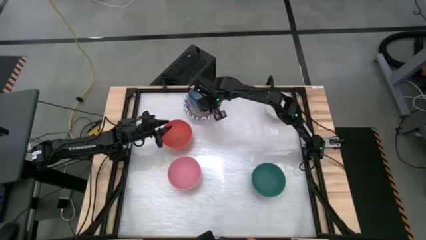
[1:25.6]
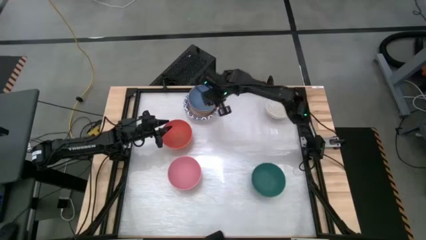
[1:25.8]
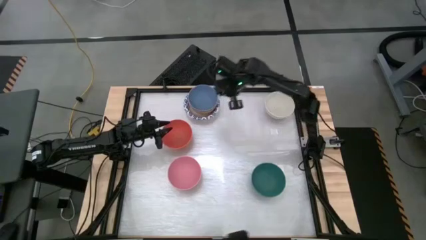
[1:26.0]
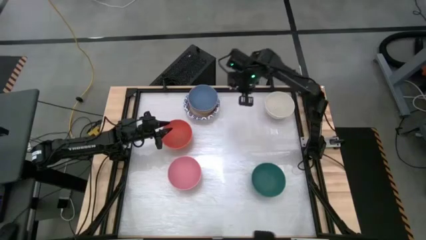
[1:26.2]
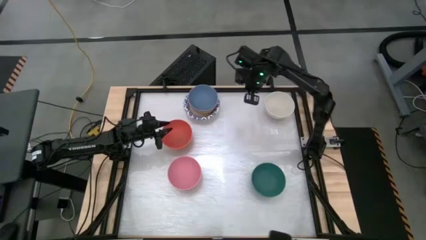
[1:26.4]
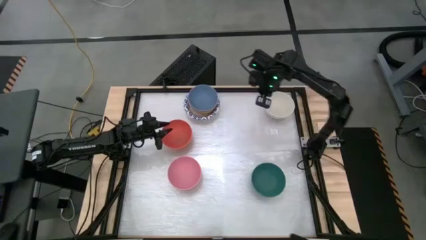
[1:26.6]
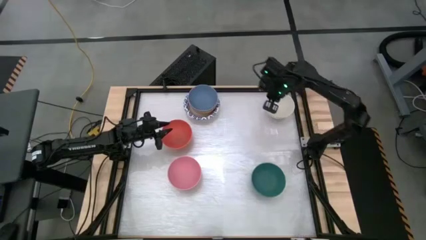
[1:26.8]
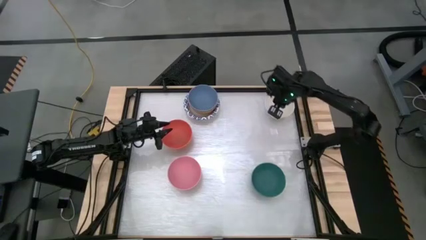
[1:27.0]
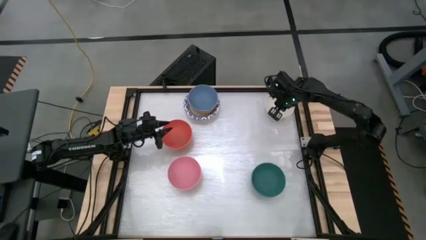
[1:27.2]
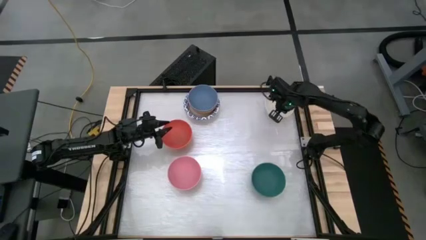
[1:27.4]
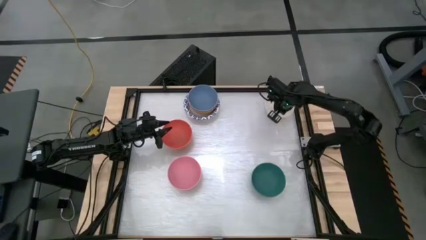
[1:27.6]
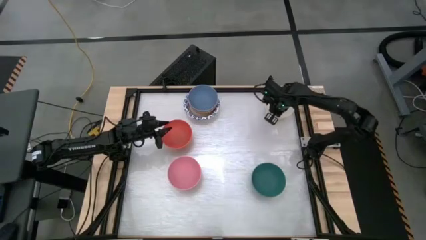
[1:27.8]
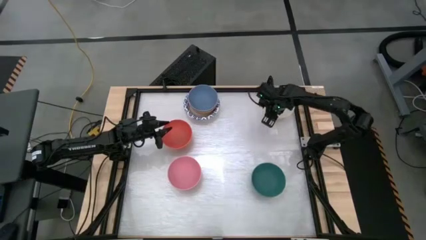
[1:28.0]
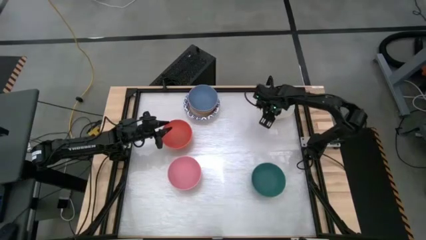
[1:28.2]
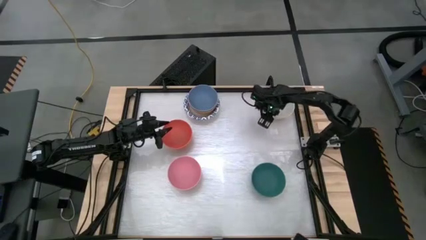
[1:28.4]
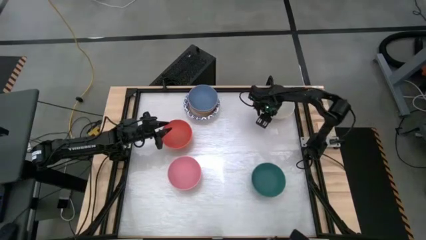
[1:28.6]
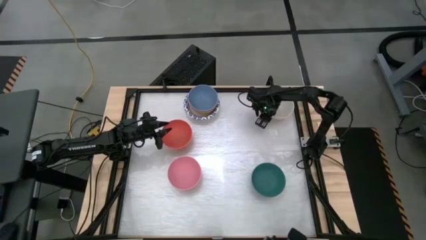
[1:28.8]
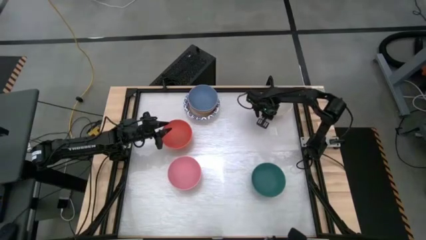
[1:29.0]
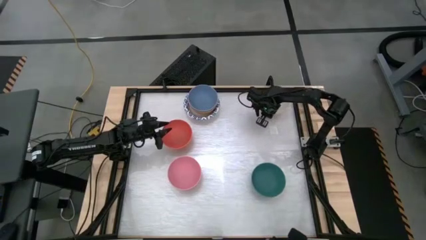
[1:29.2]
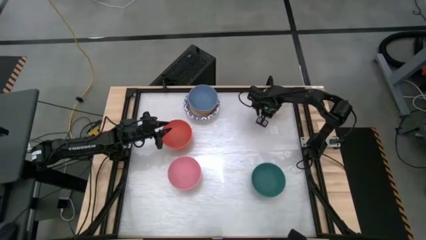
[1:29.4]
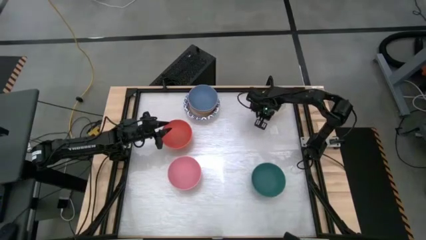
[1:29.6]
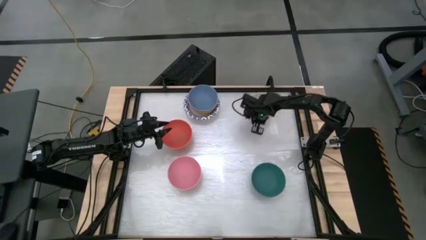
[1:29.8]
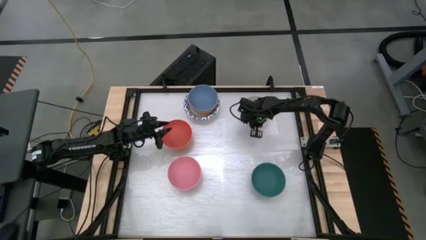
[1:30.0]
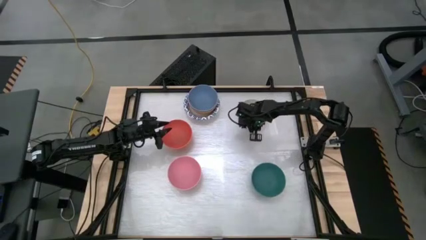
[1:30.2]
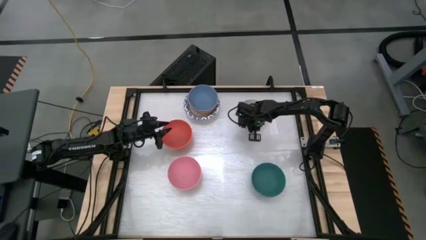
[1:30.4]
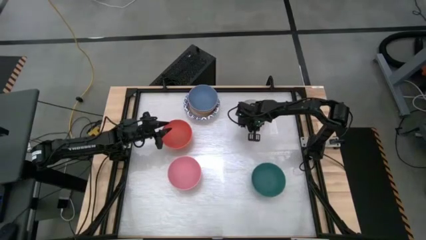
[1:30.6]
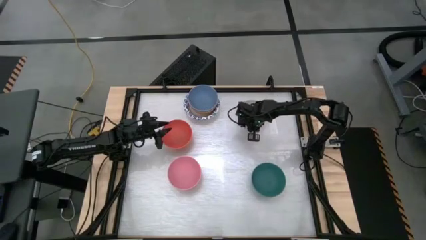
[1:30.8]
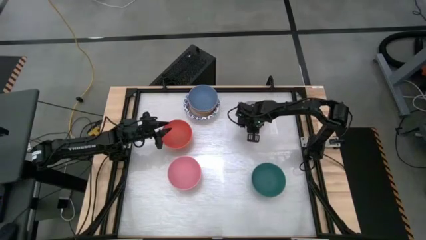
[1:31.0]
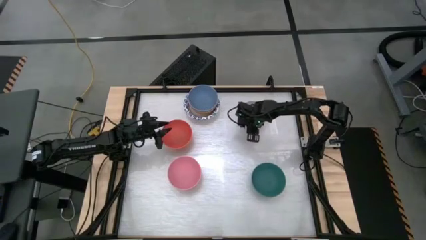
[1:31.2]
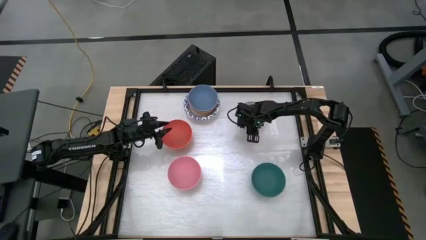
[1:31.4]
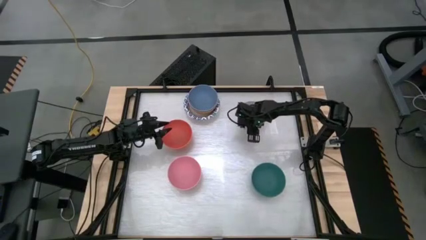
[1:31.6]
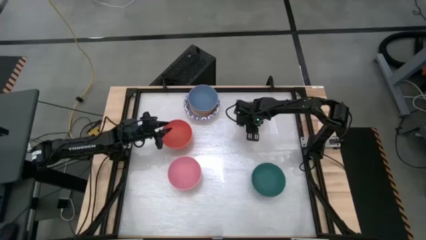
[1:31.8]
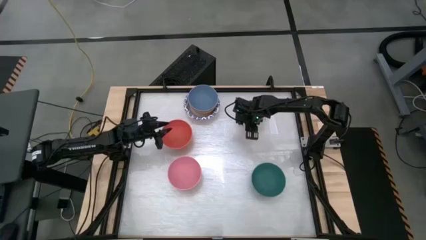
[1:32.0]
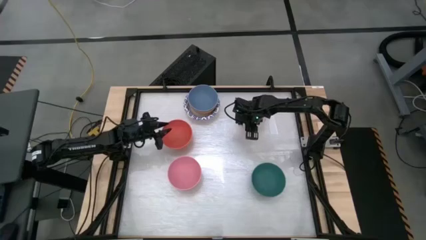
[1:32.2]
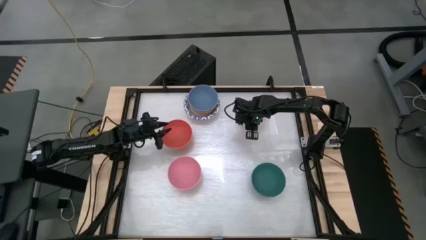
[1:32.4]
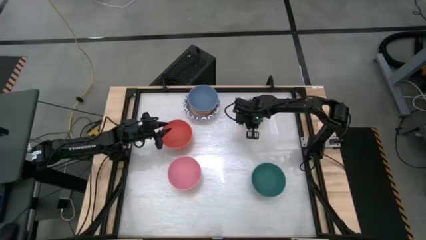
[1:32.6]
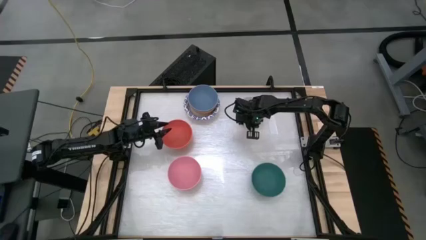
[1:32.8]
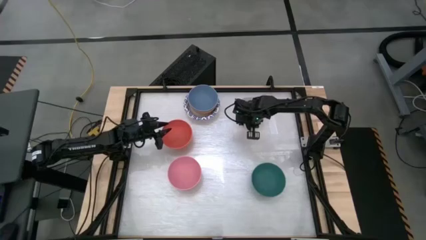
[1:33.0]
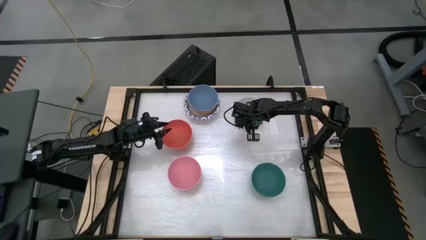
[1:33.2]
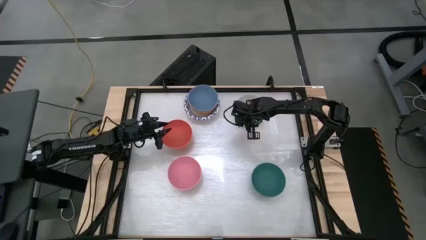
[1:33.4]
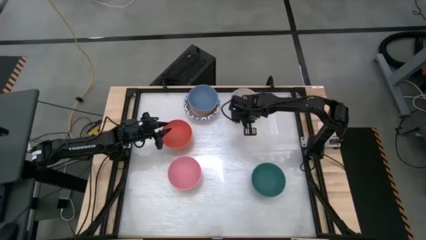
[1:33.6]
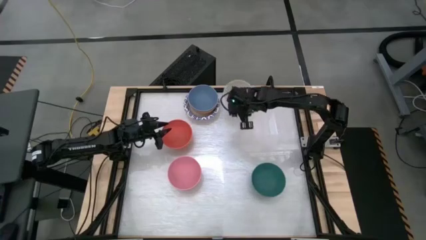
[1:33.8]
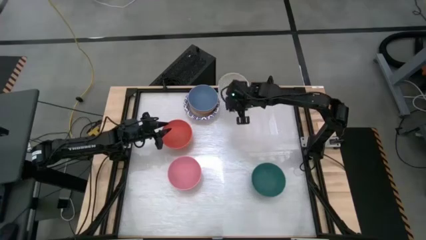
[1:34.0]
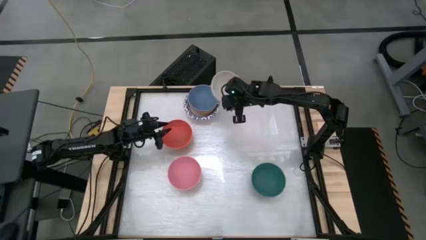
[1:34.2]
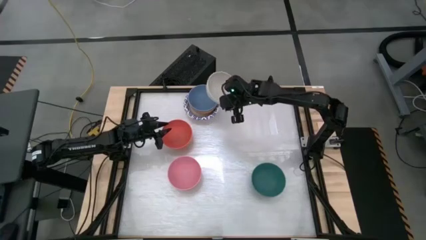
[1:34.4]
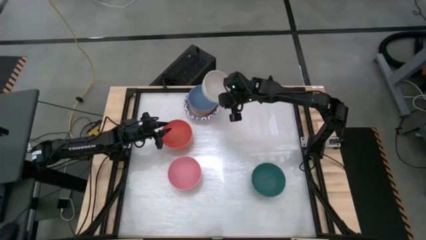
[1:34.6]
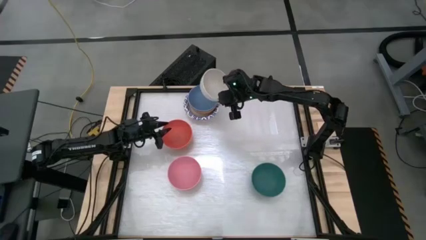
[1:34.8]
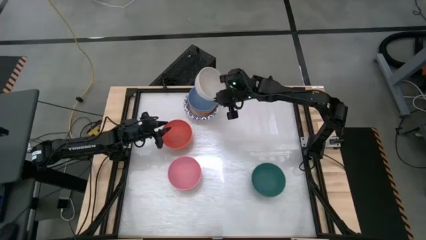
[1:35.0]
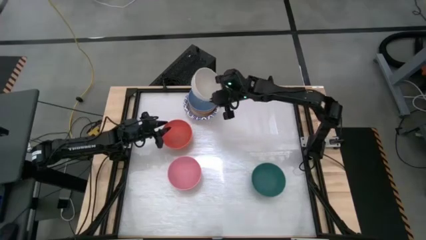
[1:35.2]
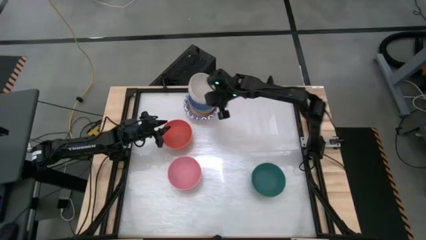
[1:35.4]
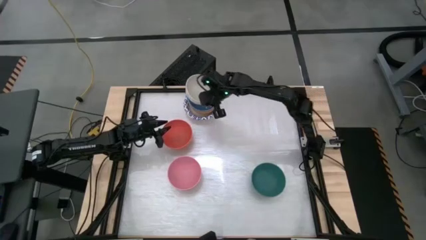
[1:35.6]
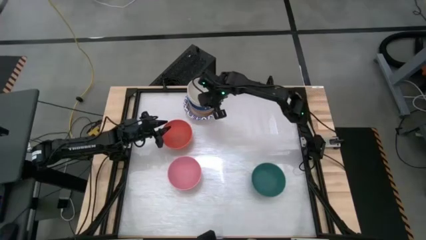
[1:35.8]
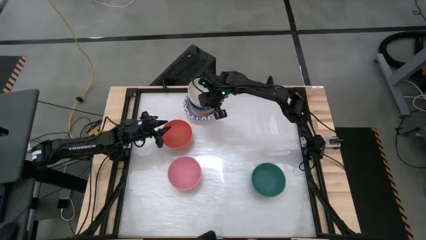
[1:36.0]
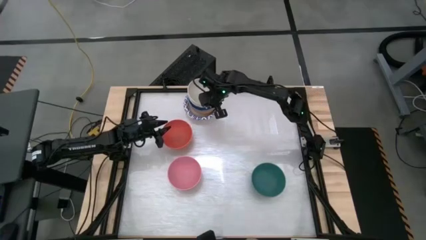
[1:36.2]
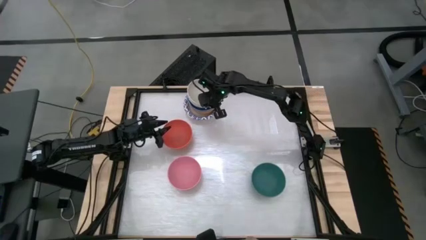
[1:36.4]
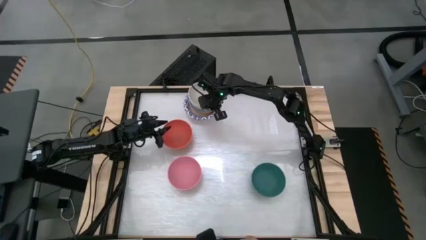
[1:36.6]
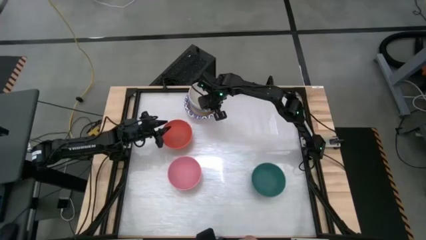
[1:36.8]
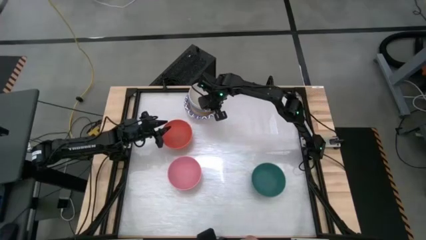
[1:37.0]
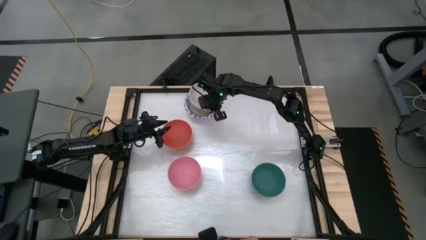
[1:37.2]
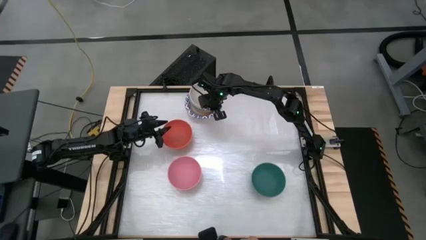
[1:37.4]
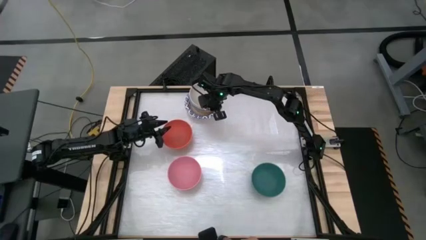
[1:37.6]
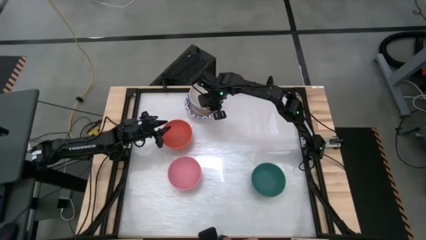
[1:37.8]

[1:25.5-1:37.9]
Stack the white bowl onto the stack of bowls
